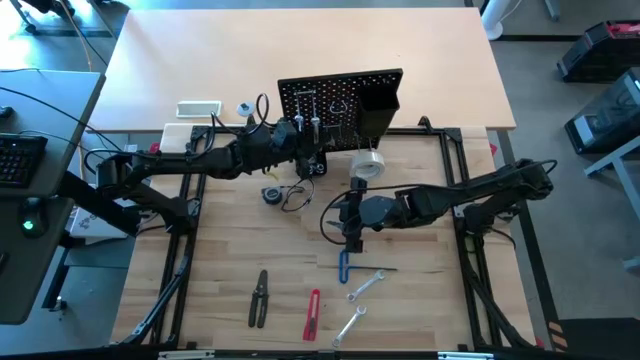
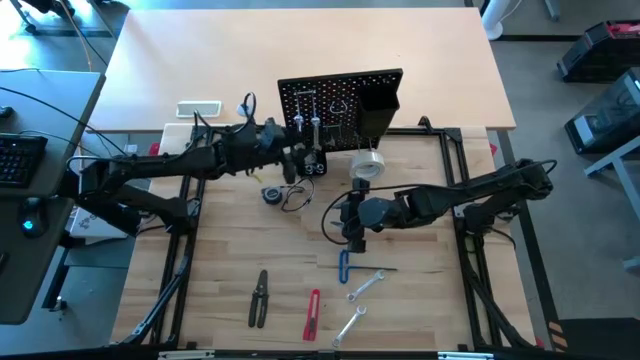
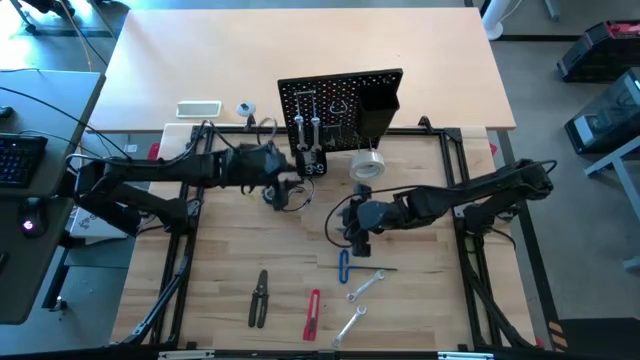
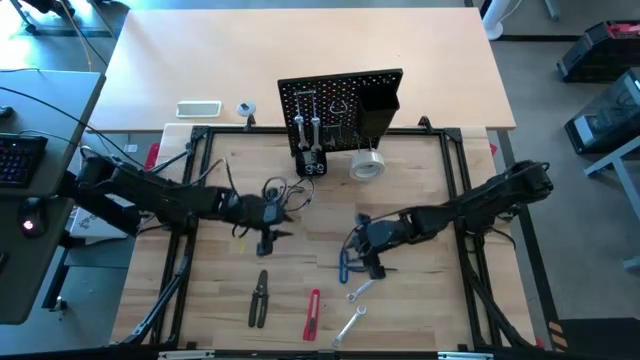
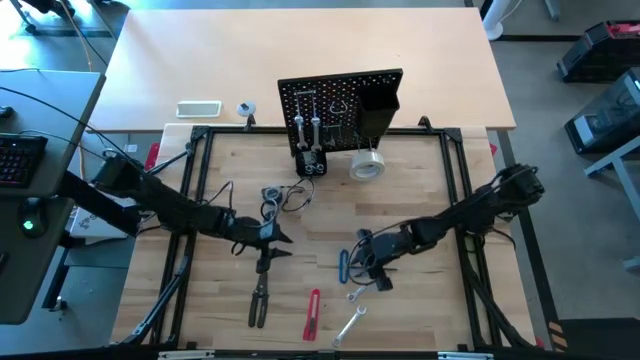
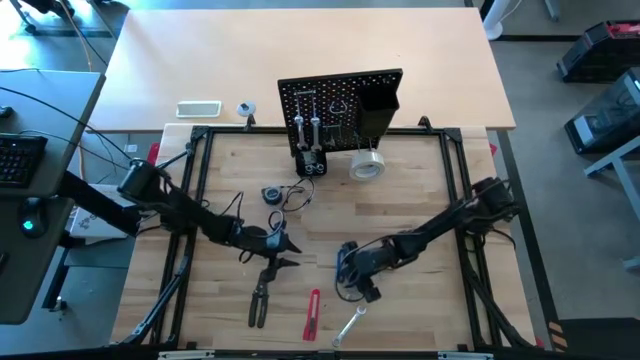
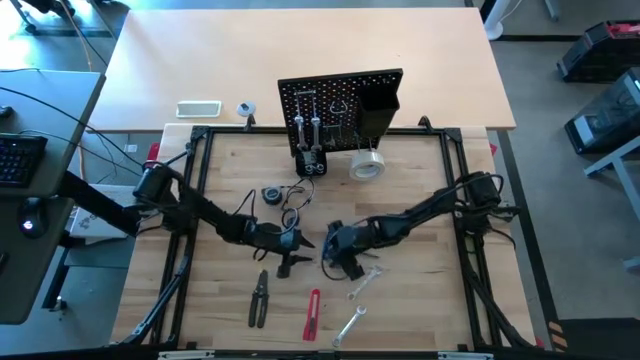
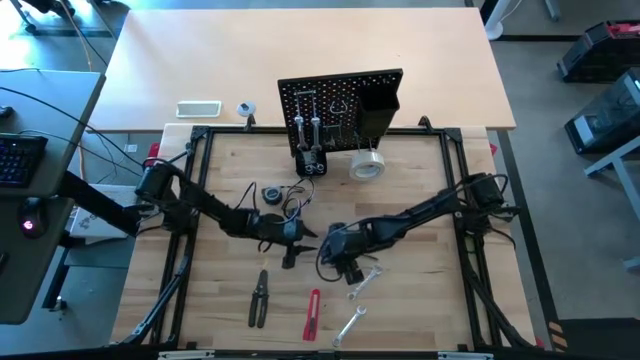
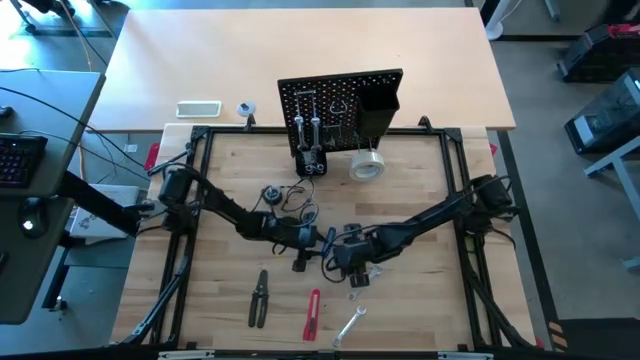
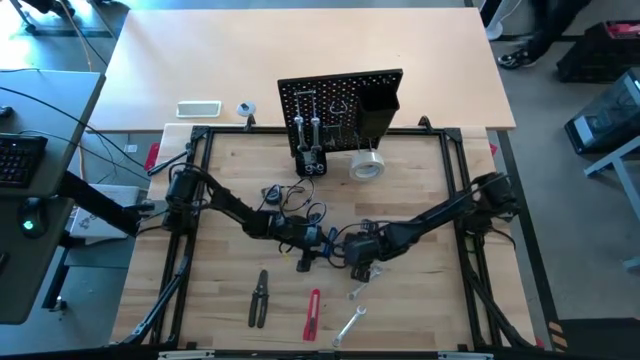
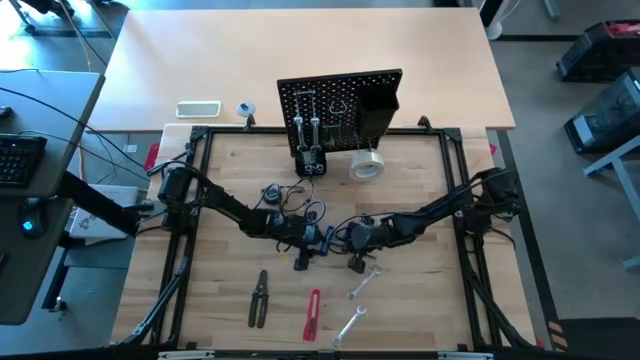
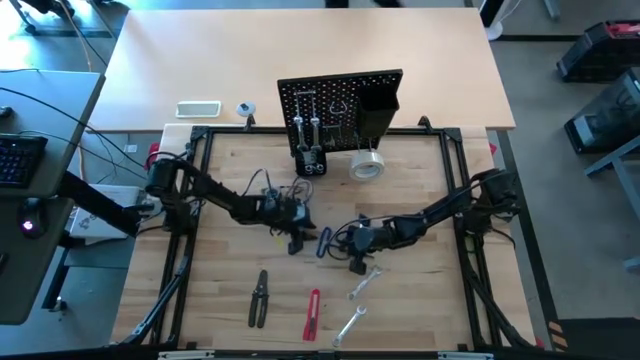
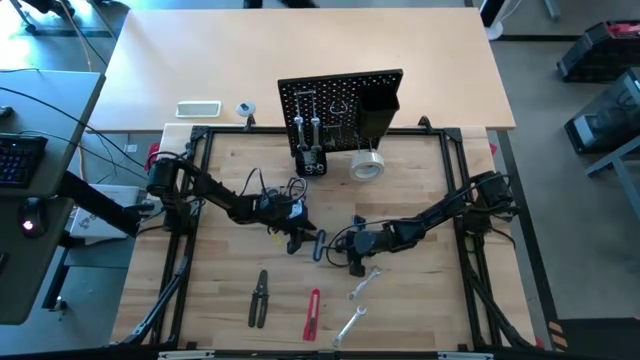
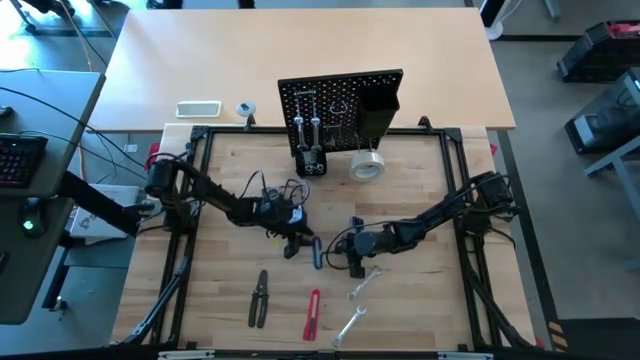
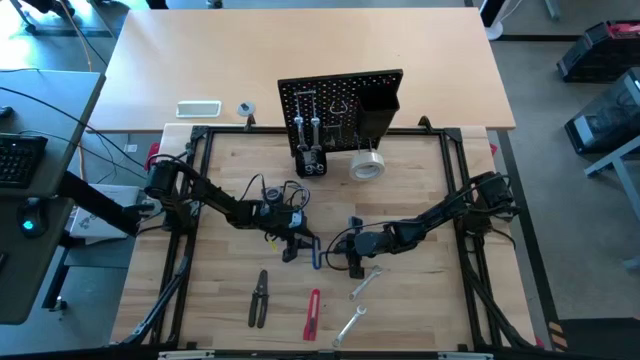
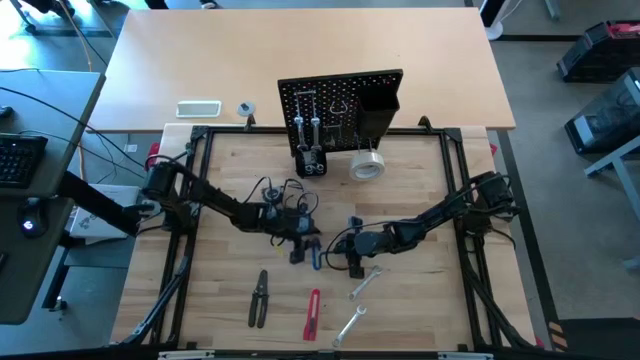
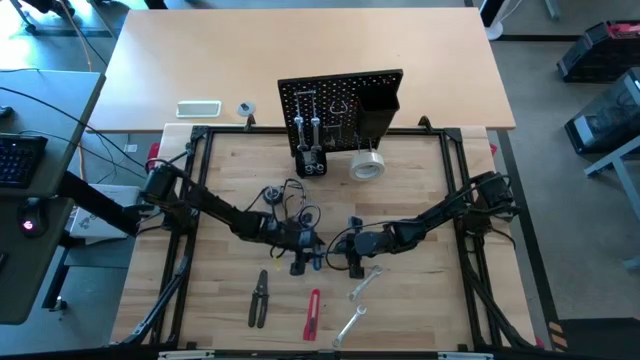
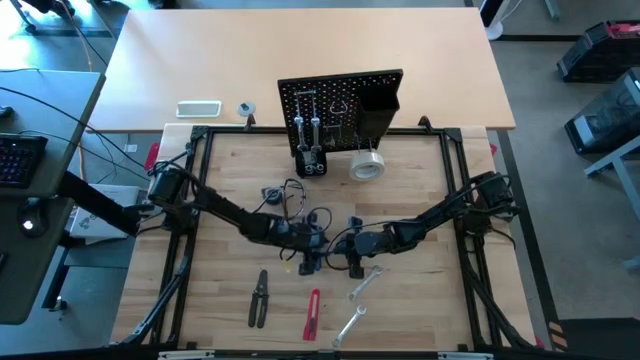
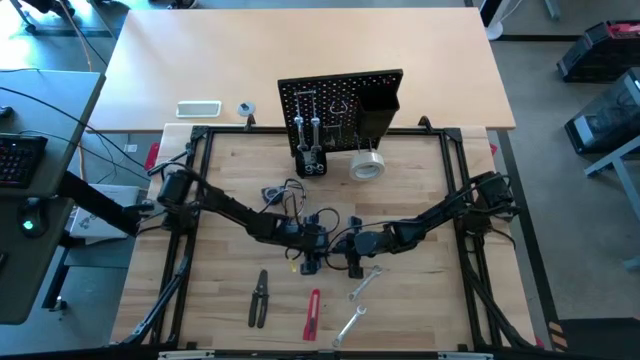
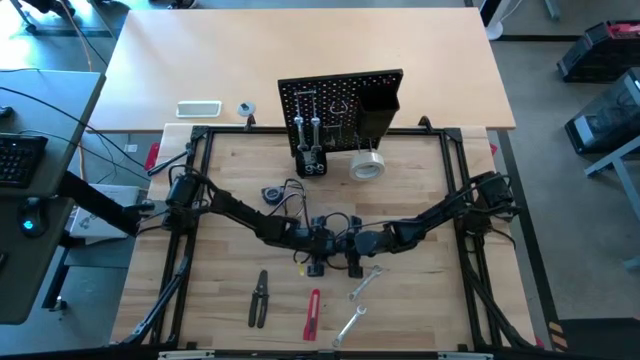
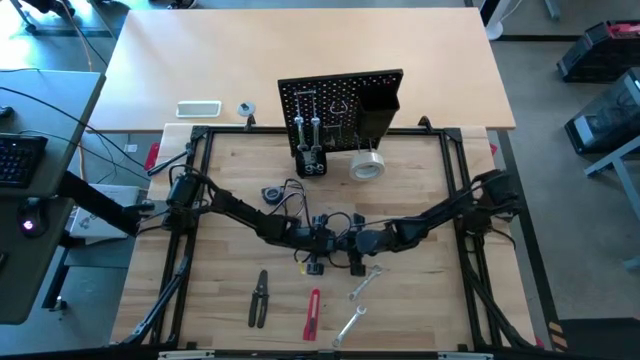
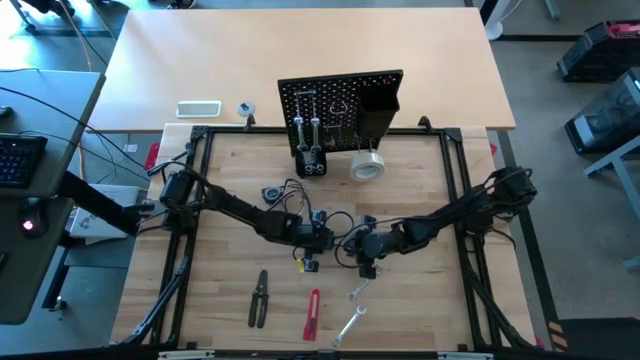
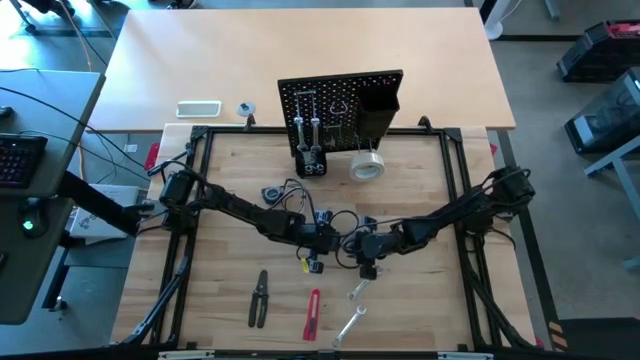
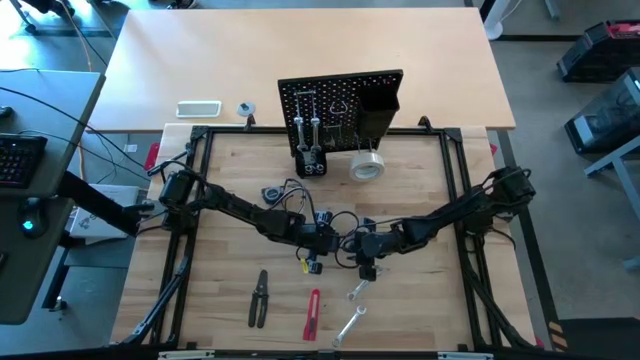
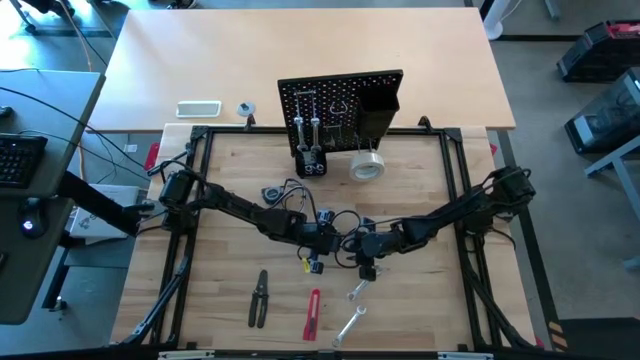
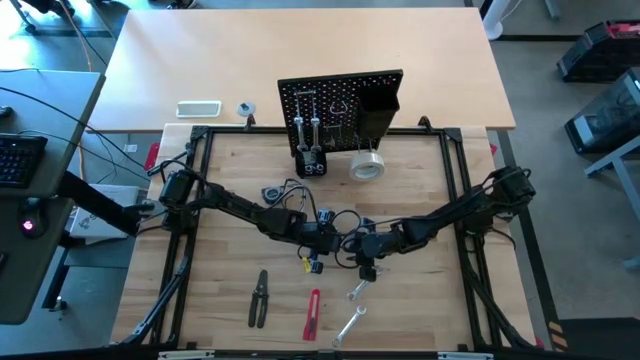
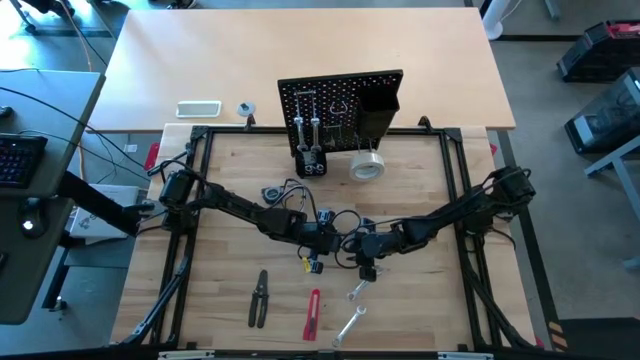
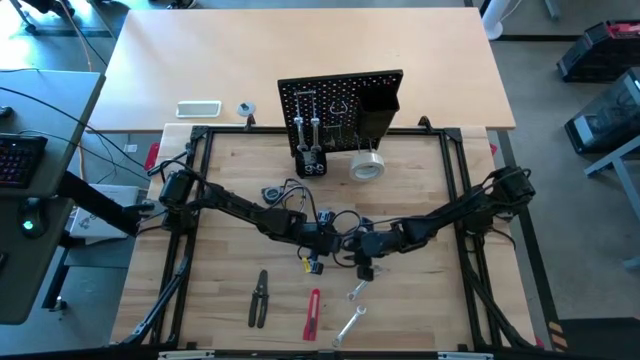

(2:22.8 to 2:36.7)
Task: Hang tools onto peg board
Put the blue pick tool into the top black bin on the peg board

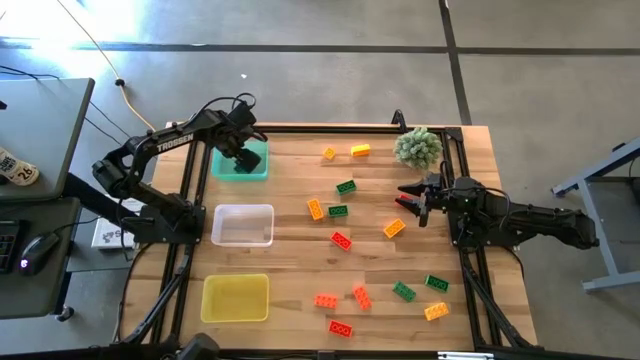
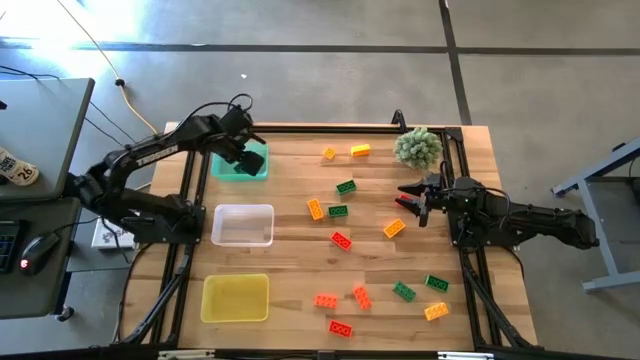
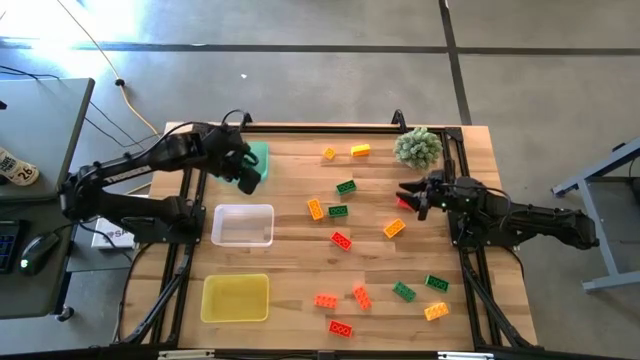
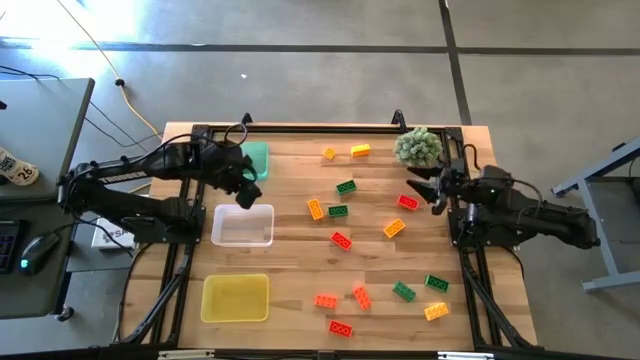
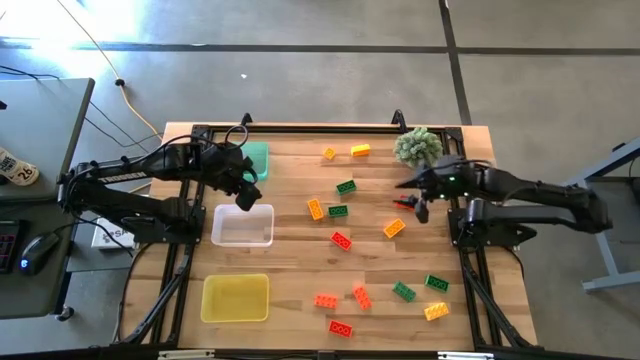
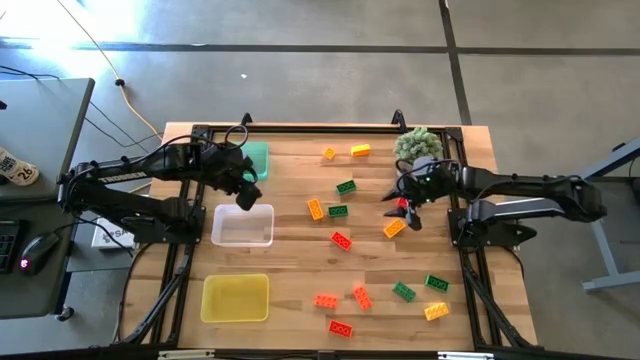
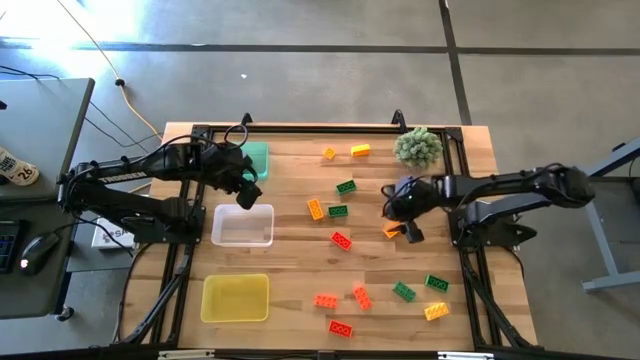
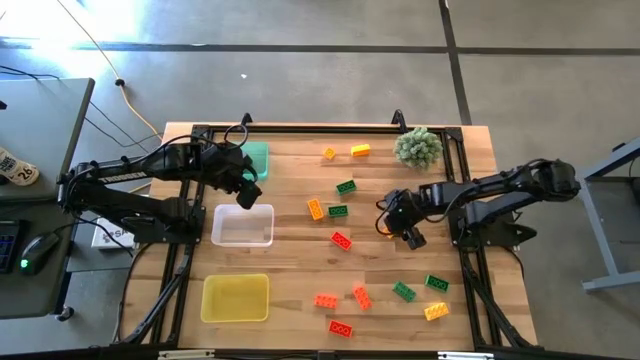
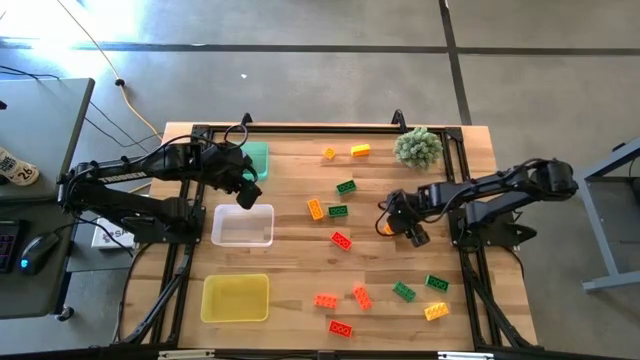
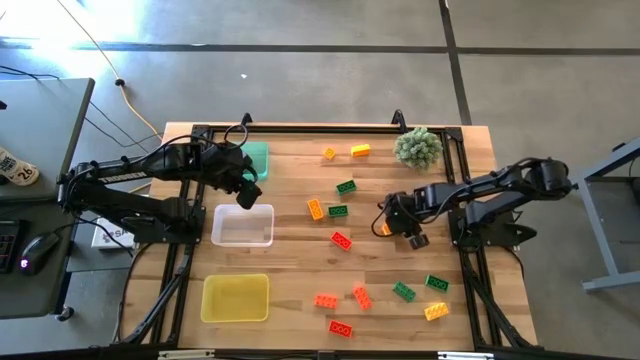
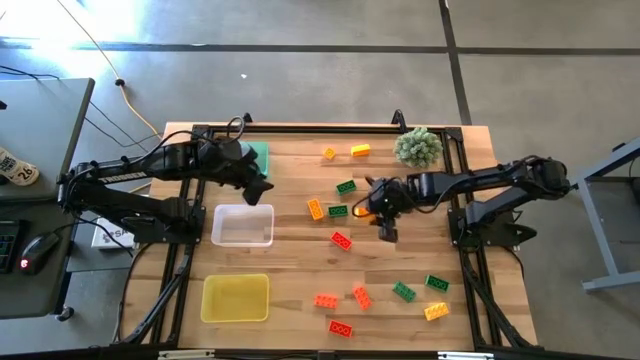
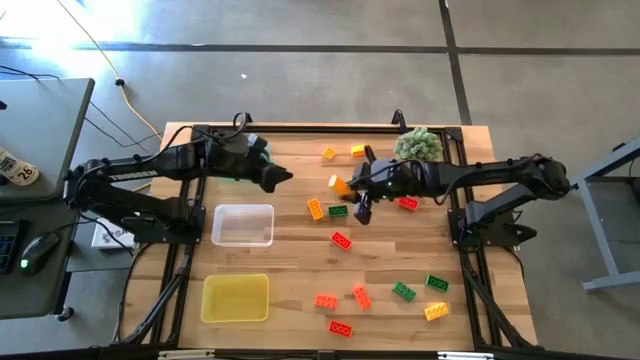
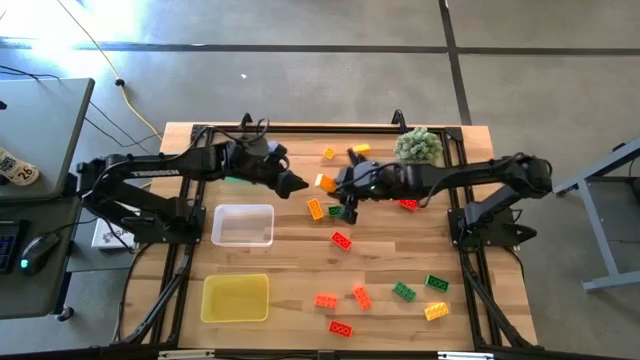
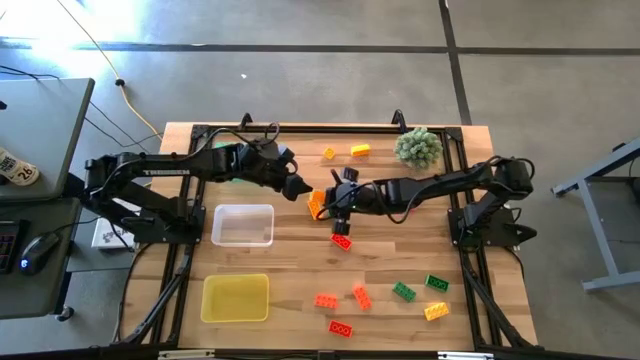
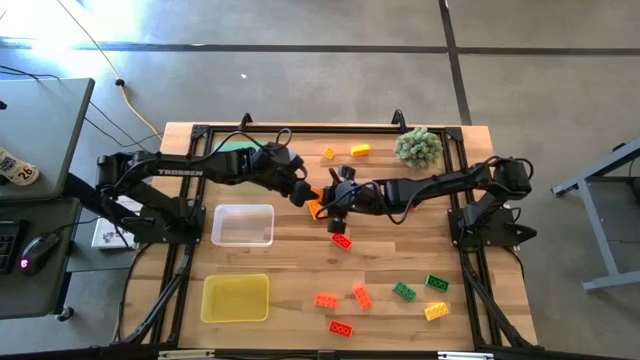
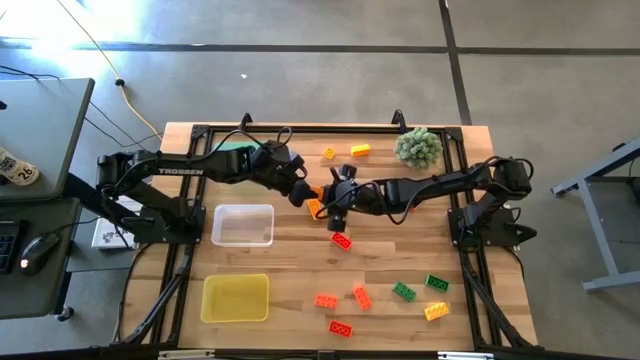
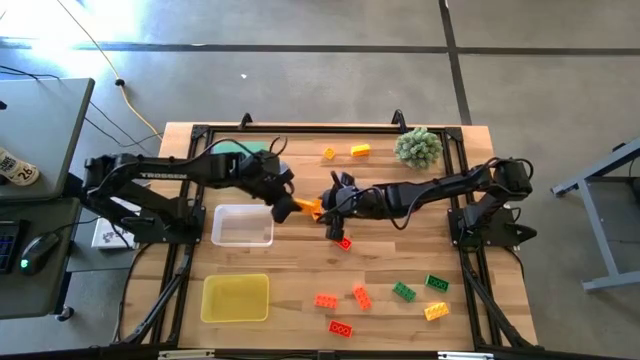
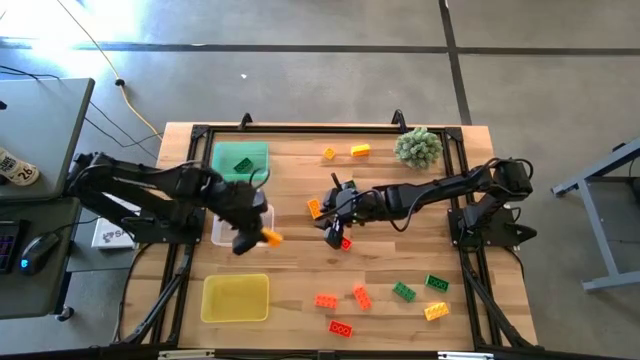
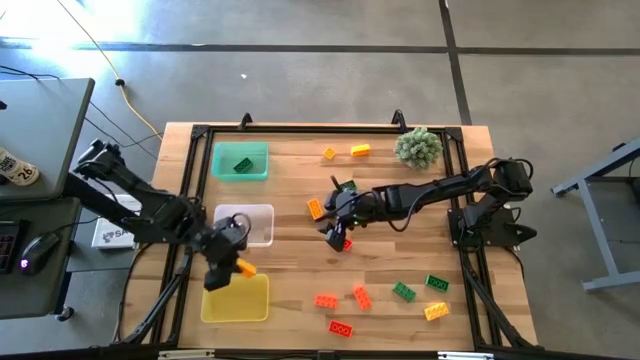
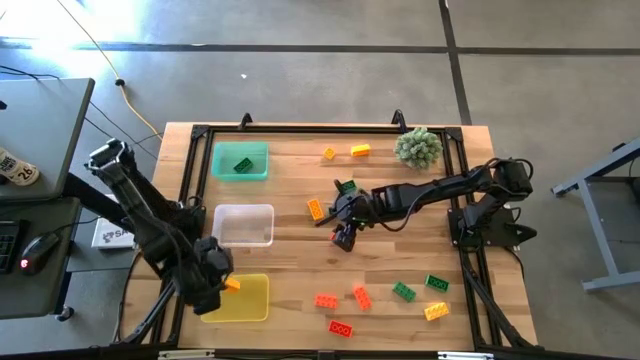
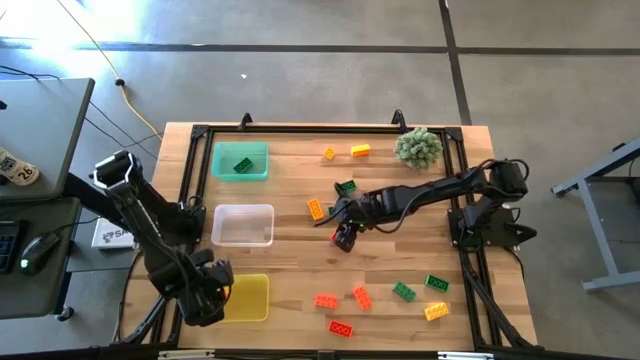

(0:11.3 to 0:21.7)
Task: Sort & place blocks by color
Put the yellow game piece into the yellow bin
